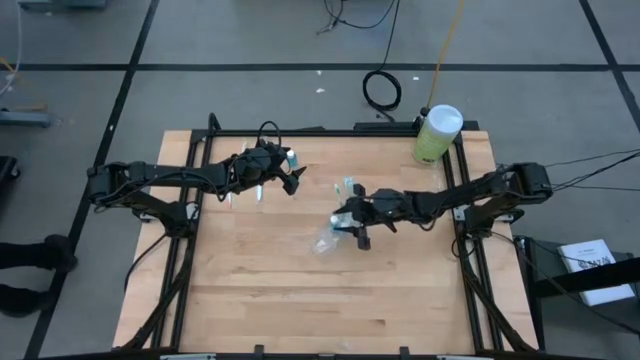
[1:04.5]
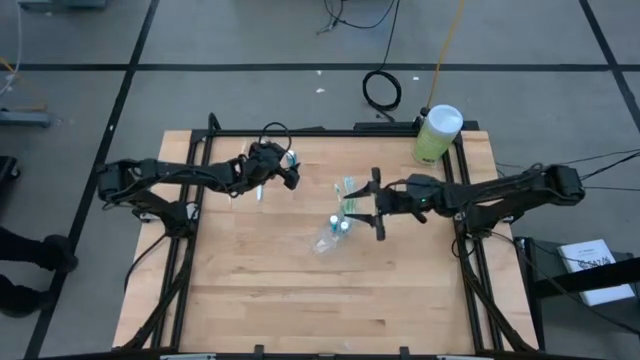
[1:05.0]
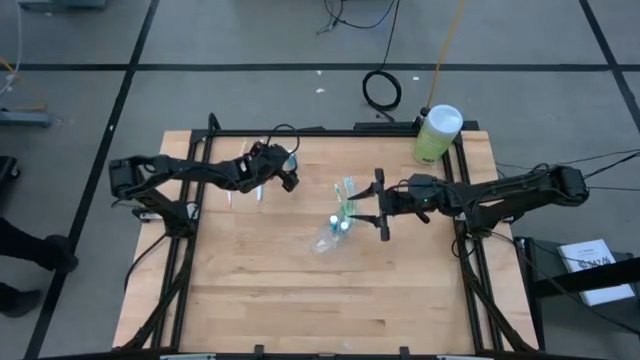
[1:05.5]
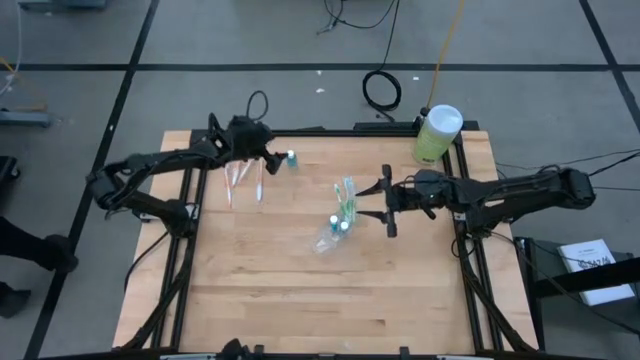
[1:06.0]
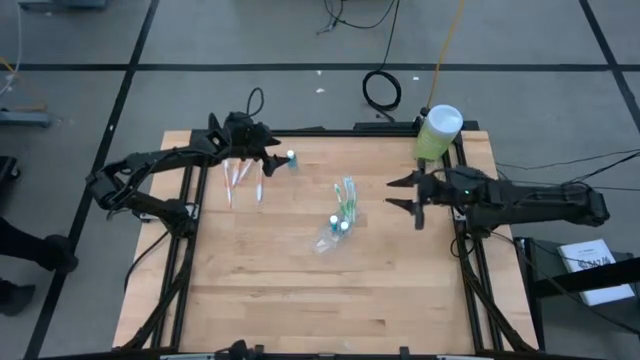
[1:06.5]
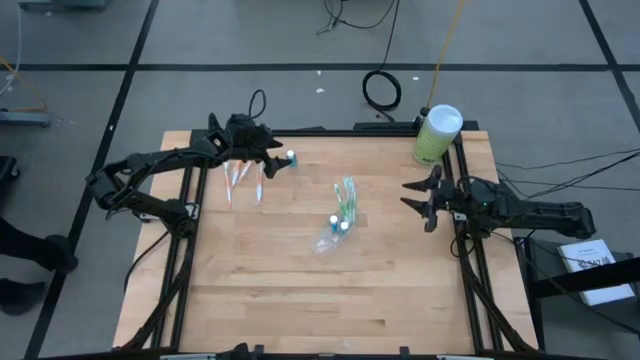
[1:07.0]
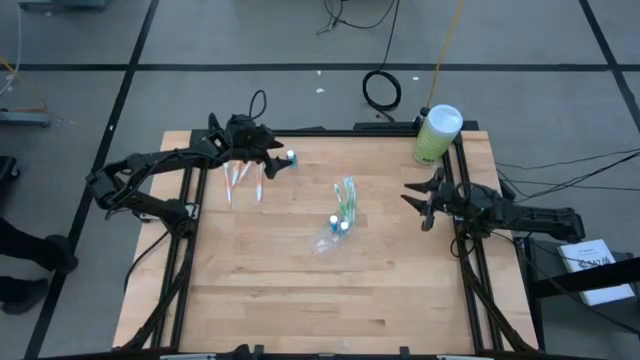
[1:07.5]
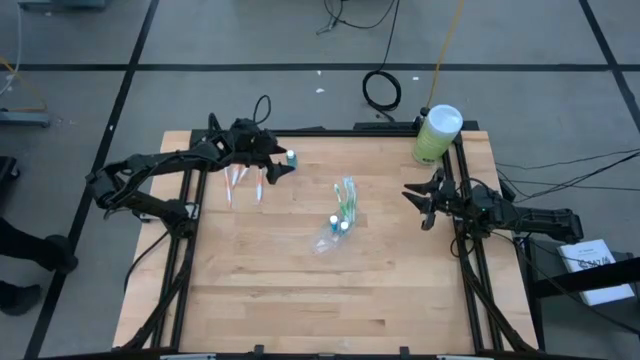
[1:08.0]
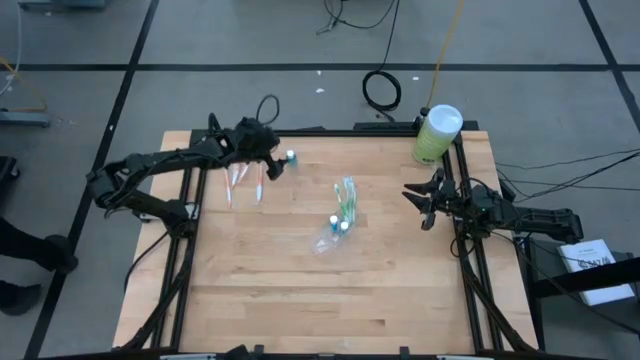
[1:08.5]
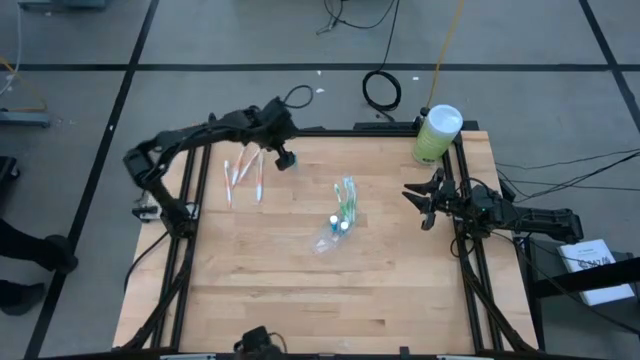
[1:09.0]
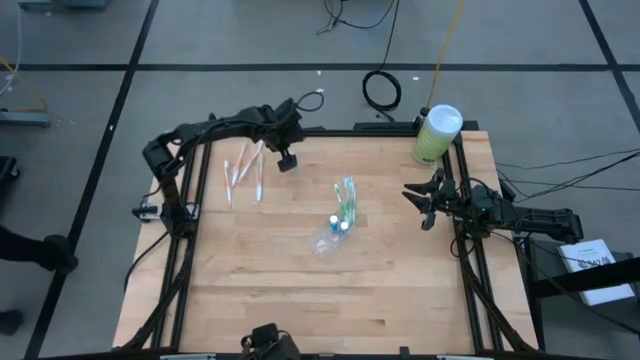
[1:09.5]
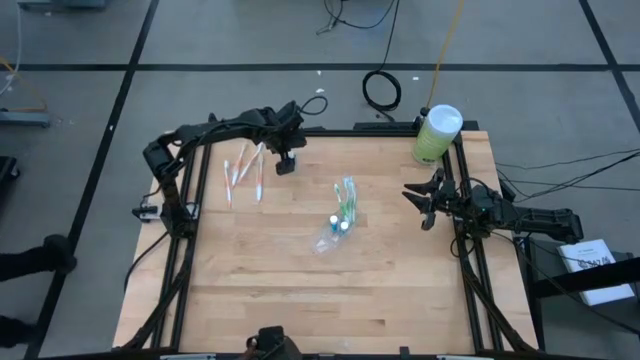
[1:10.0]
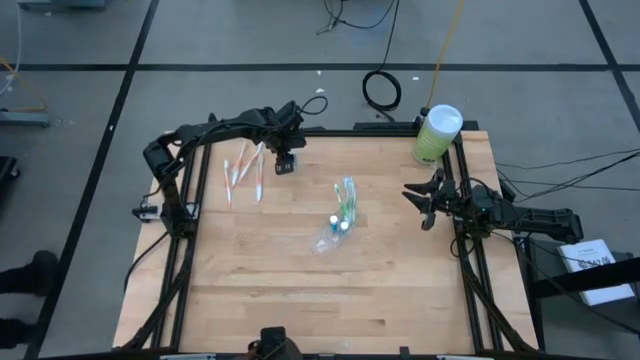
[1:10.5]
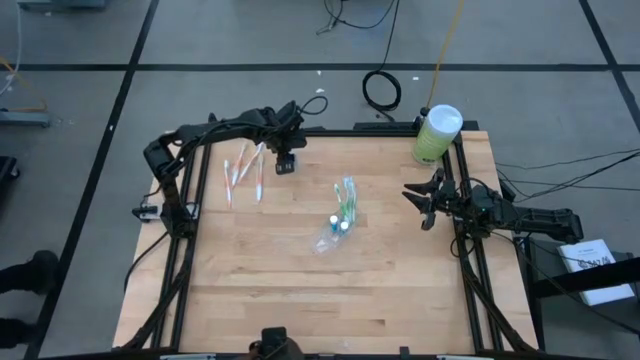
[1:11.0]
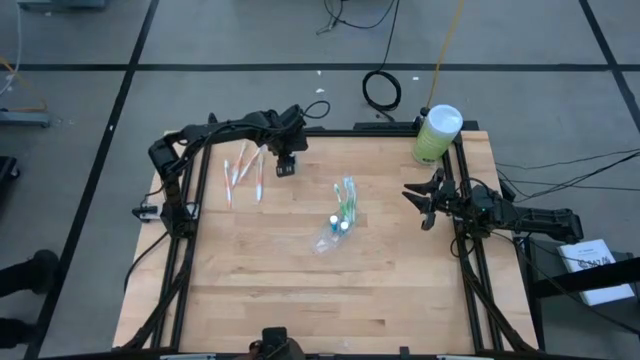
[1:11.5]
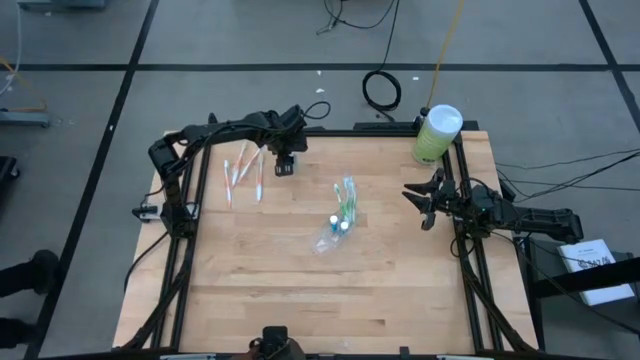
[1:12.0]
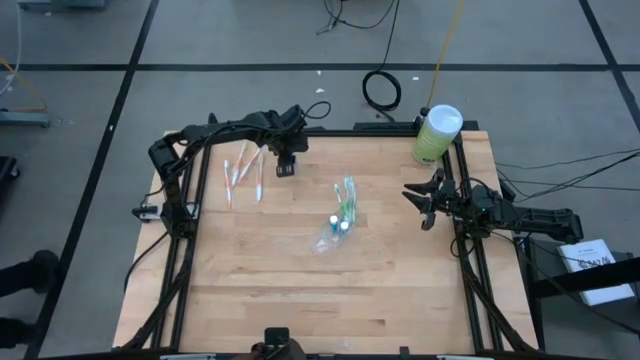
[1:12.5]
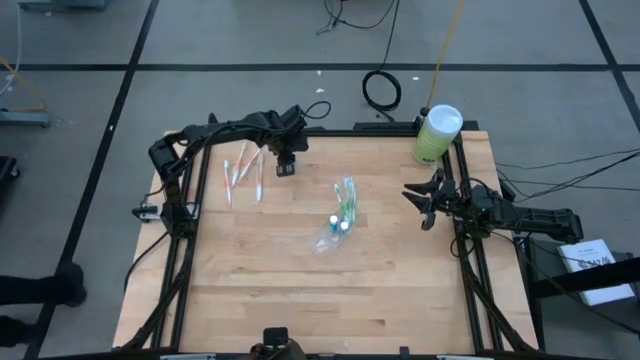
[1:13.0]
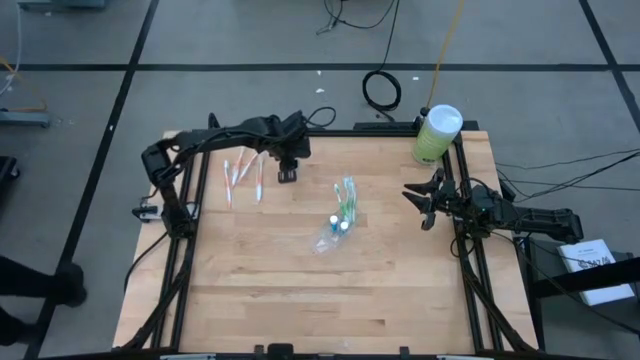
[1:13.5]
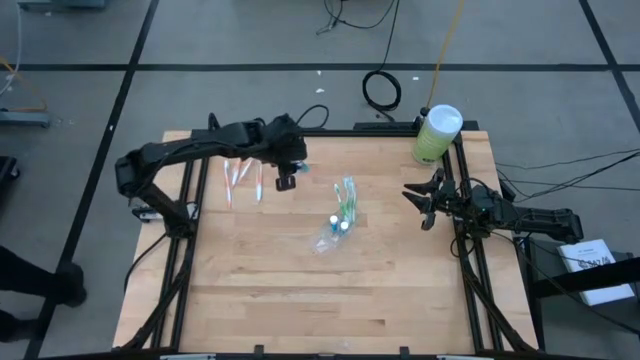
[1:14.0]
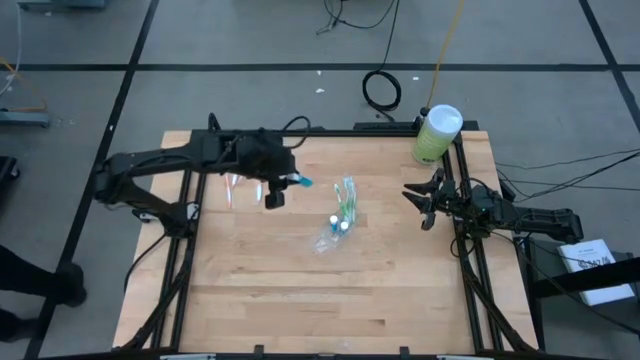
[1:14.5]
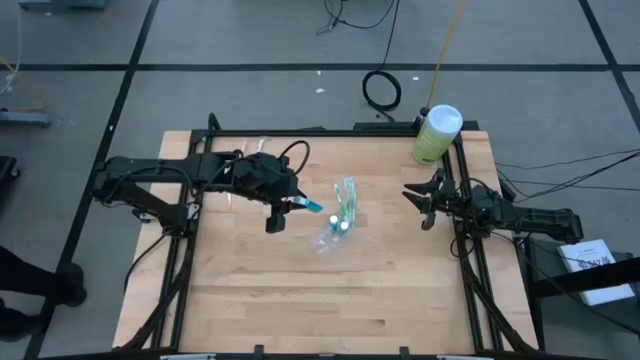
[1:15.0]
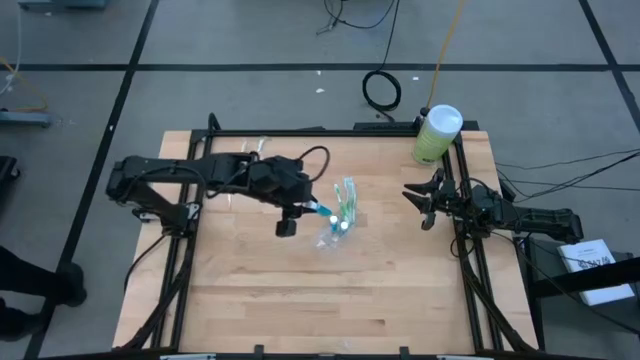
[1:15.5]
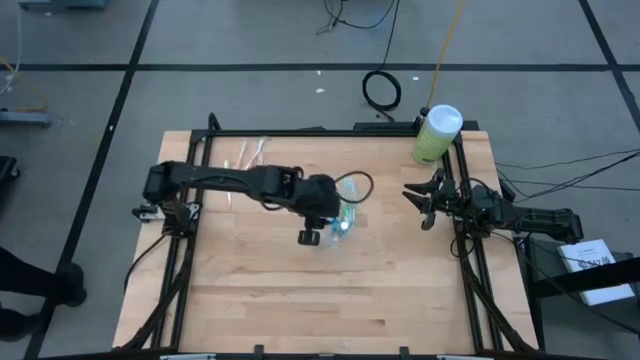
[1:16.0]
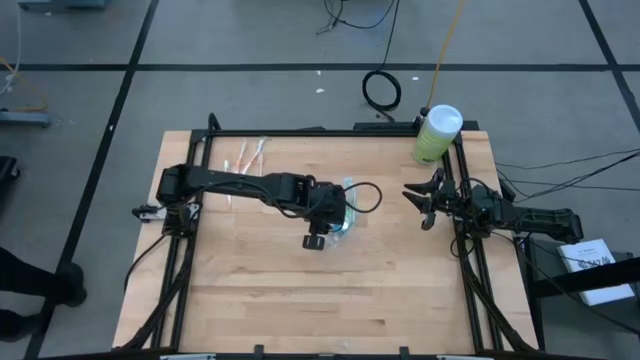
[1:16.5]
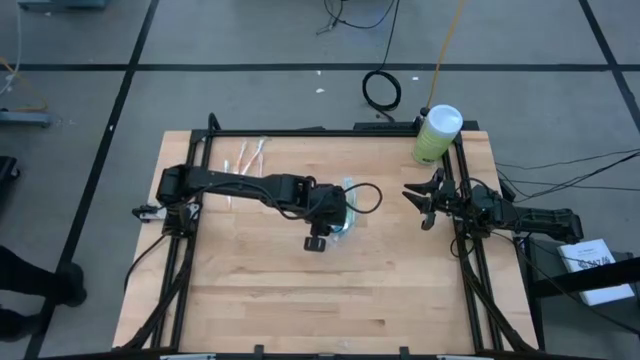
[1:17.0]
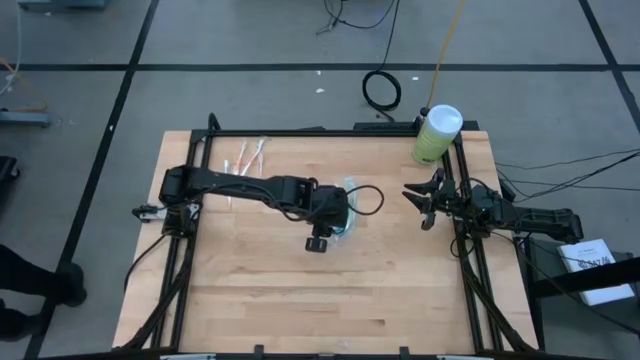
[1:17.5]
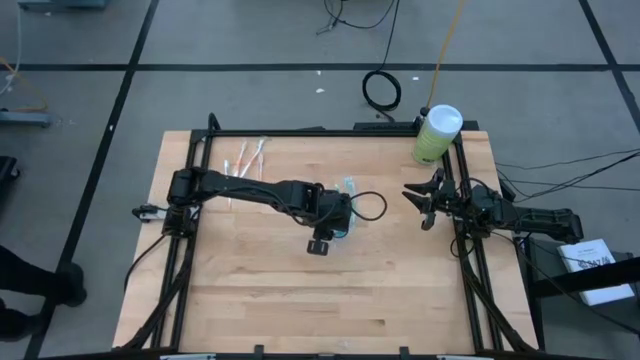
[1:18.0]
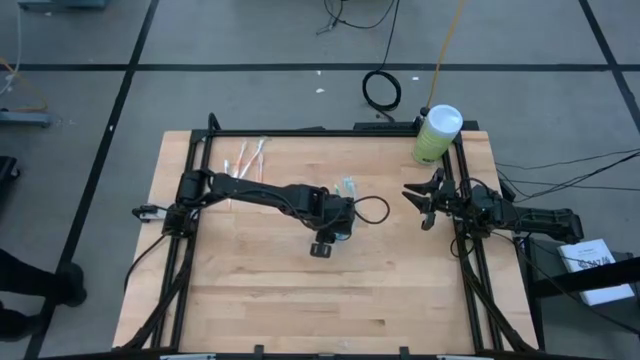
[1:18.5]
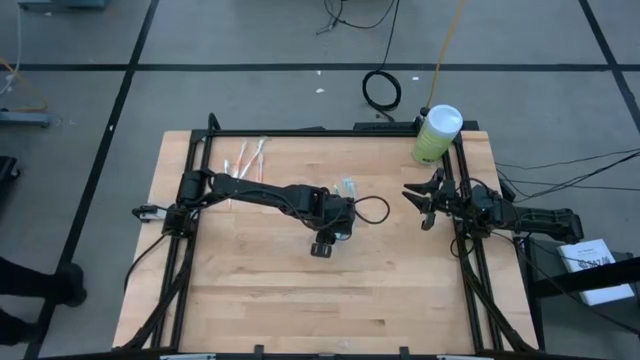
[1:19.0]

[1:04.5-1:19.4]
Task: Pick & Place toothbrushing station
Put the mouthwash bottle into the transparent organizer

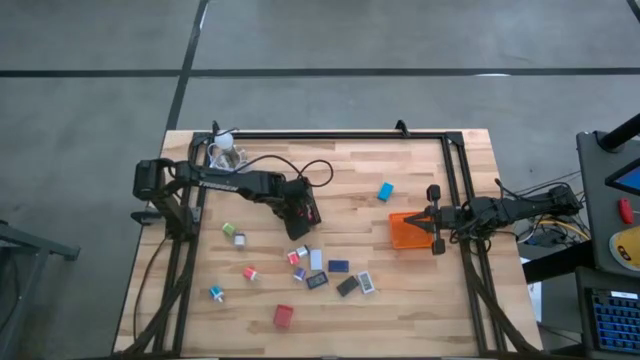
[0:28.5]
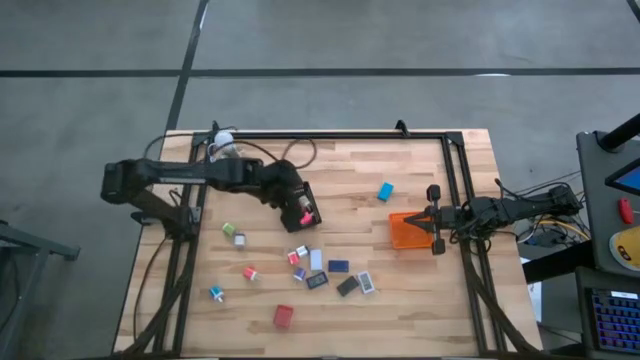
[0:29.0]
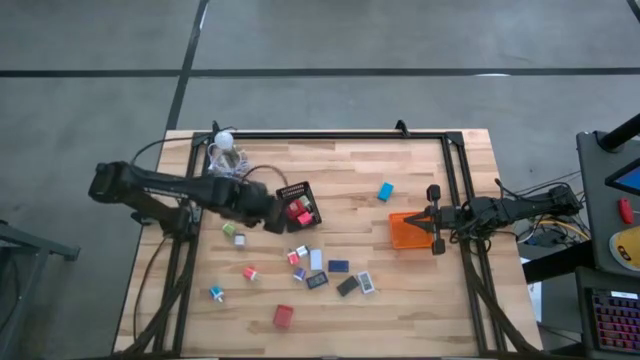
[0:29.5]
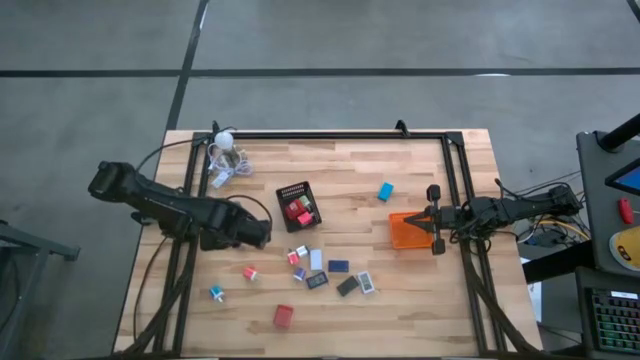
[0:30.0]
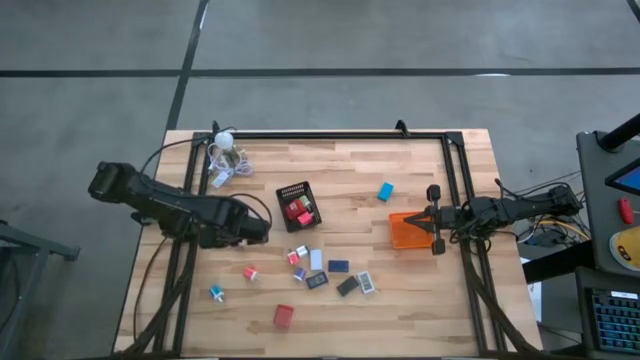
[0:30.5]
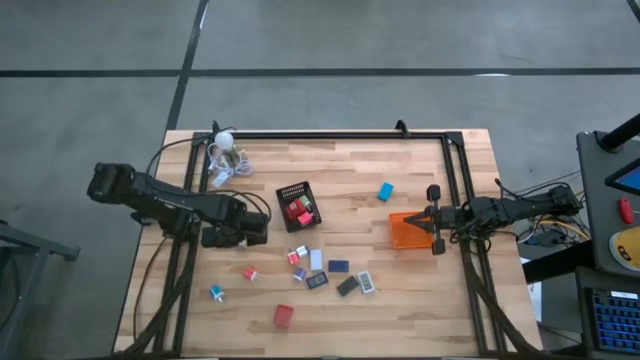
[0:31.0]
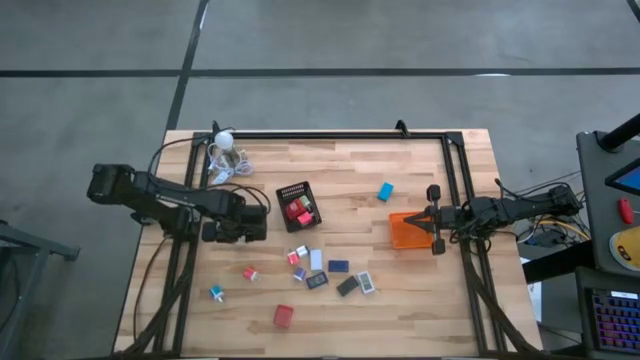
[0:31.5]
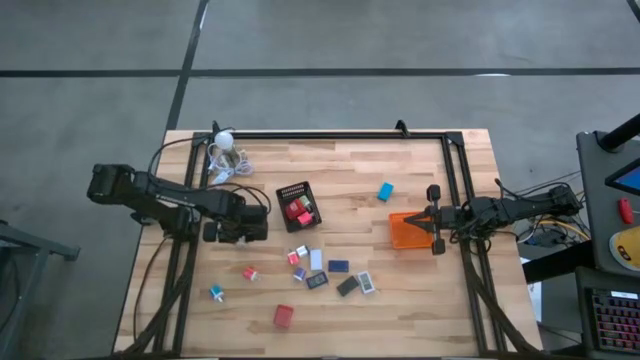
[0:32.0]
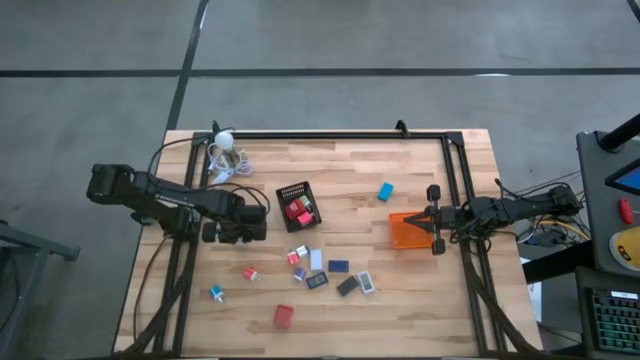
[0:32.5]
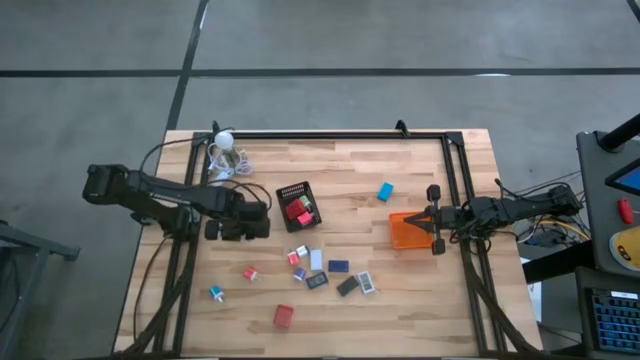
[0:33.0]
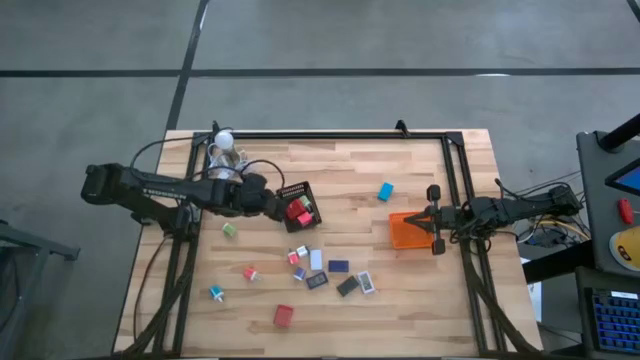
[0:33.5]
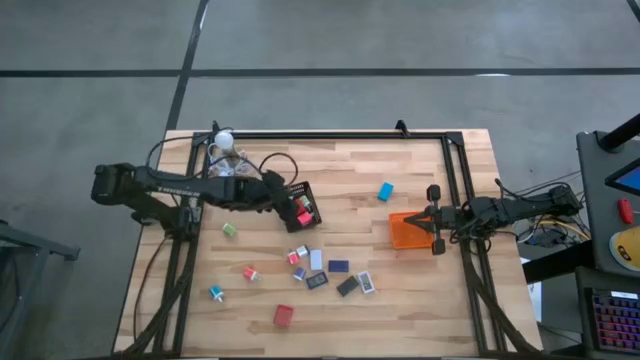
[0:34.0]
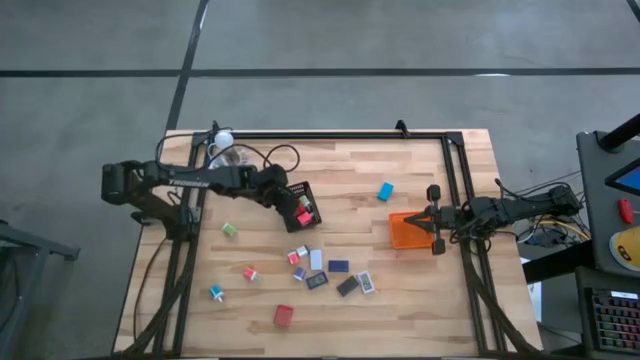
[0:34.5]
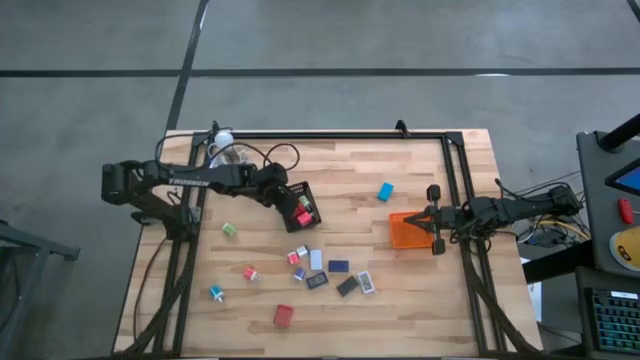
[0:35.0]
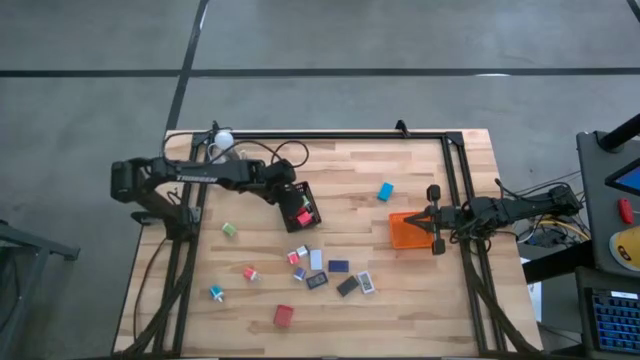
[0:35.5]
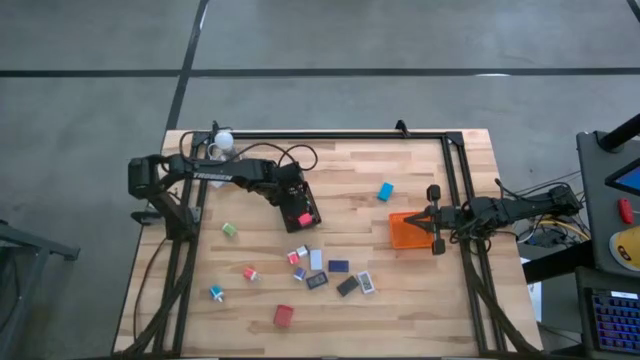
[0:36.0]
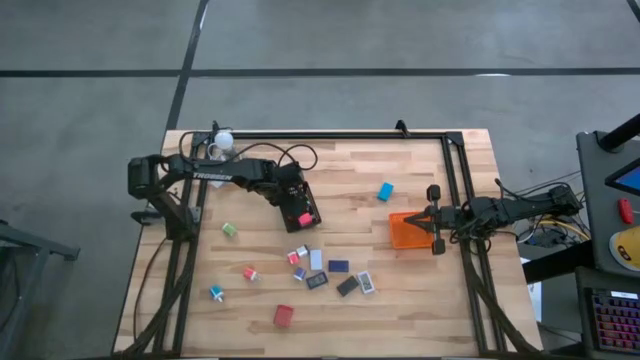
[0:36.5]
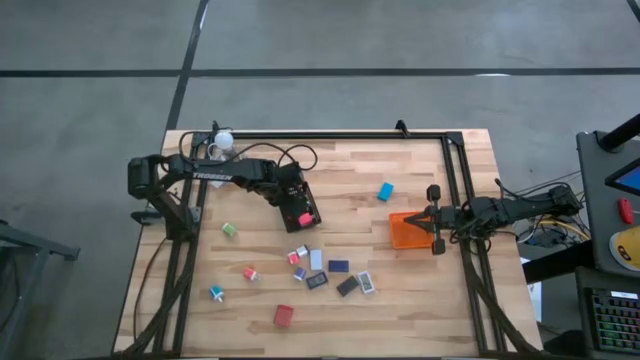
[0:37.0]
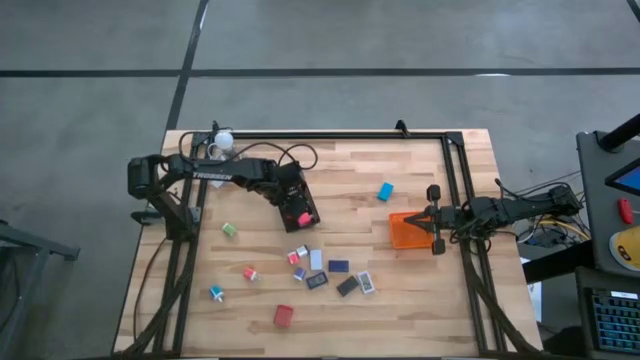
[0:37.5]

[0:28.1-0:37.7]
Task: Pick & Place Office items
Put the left white charger adapter in the black bin
